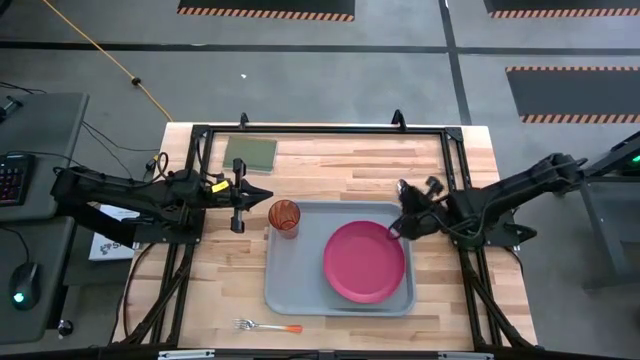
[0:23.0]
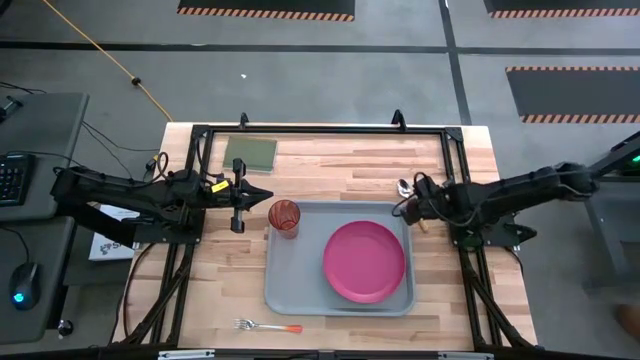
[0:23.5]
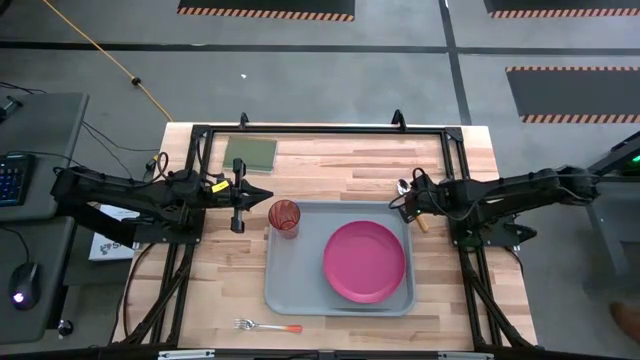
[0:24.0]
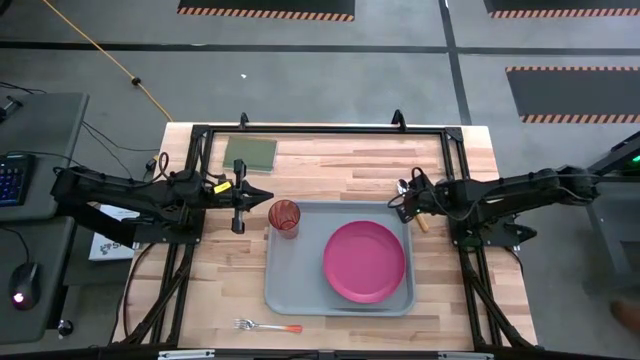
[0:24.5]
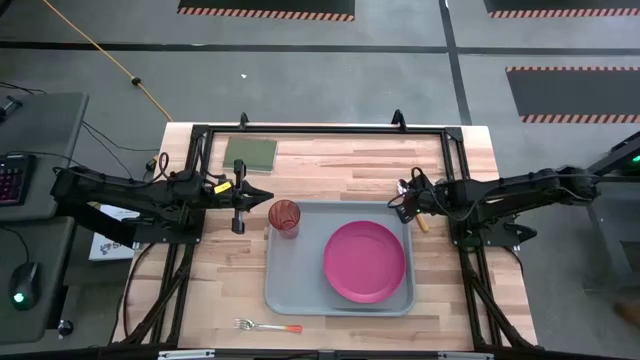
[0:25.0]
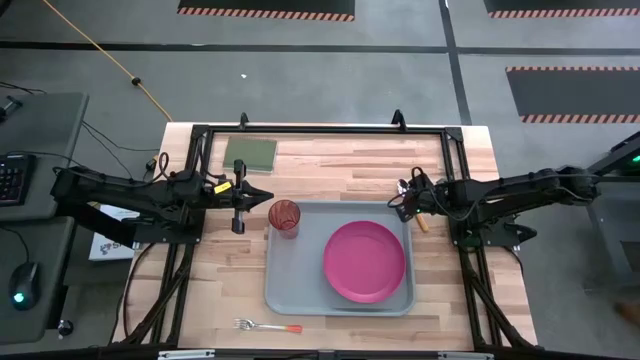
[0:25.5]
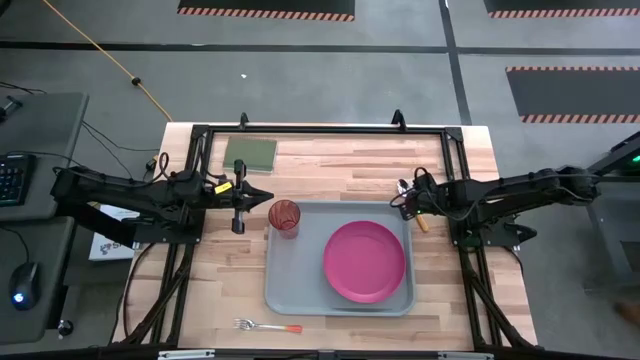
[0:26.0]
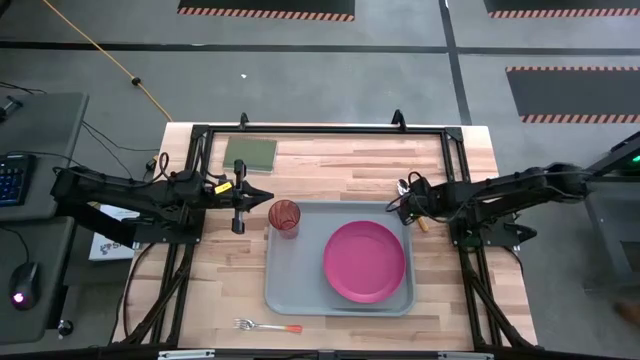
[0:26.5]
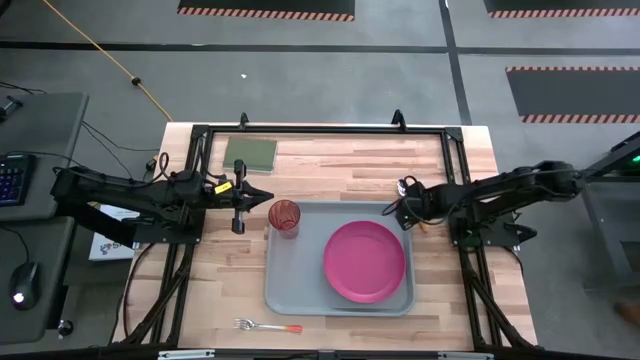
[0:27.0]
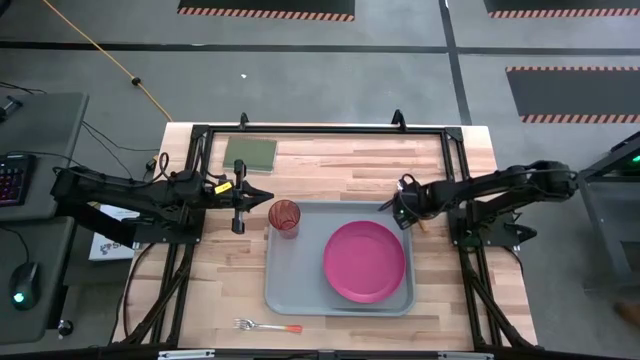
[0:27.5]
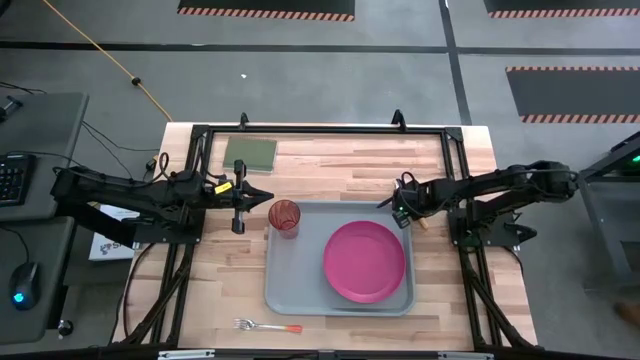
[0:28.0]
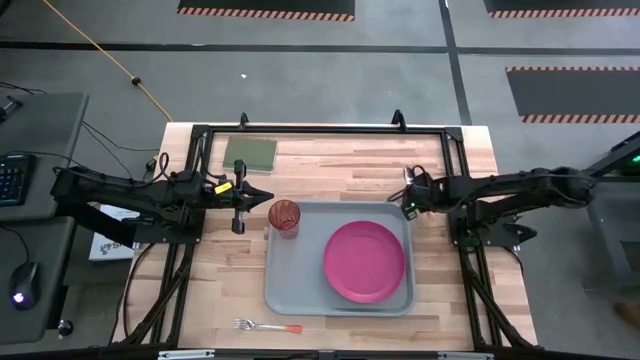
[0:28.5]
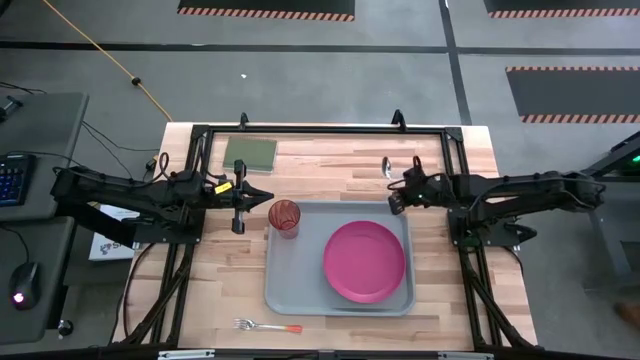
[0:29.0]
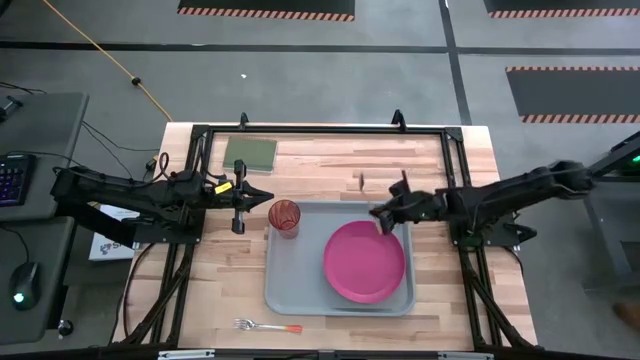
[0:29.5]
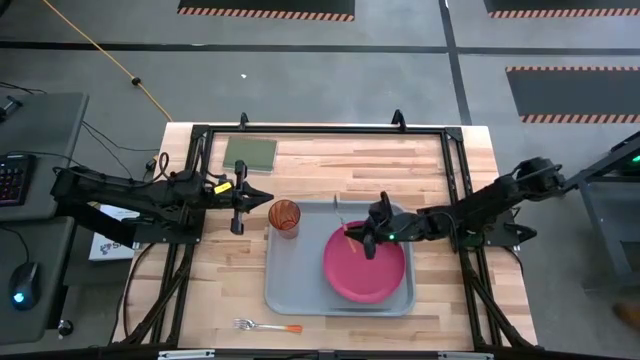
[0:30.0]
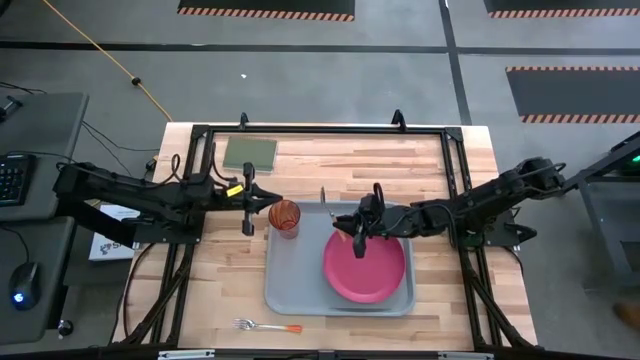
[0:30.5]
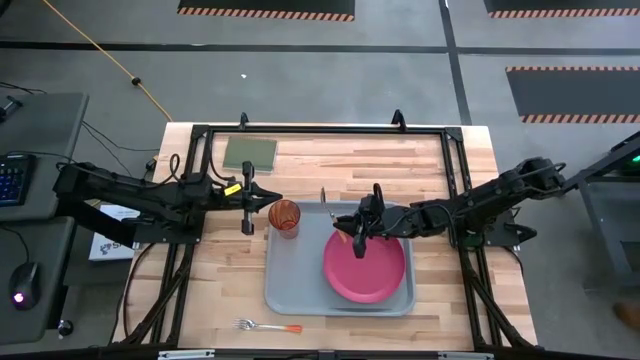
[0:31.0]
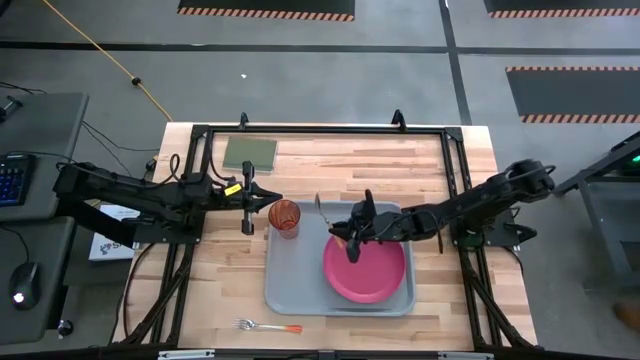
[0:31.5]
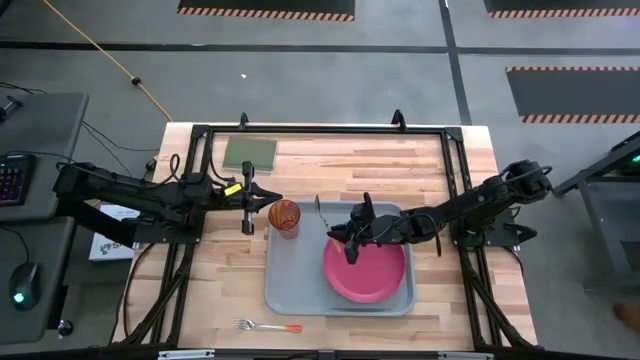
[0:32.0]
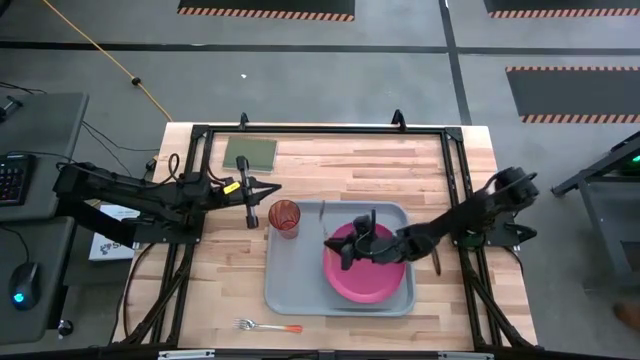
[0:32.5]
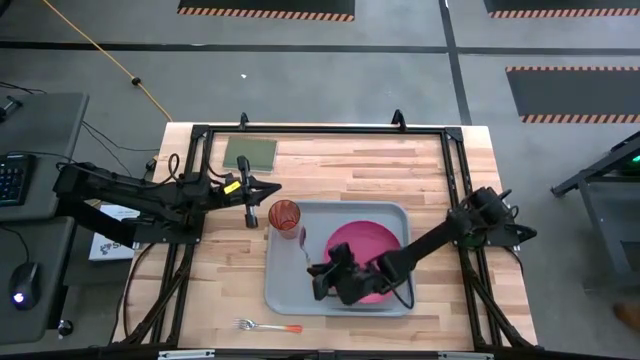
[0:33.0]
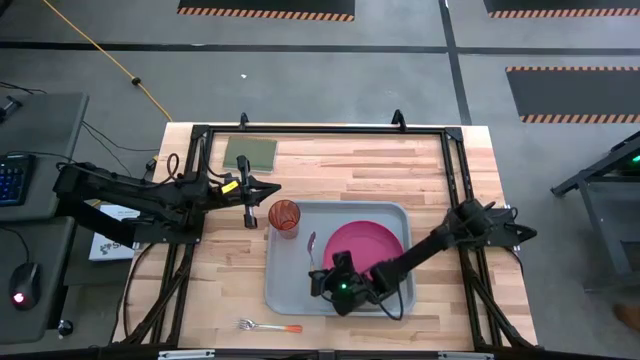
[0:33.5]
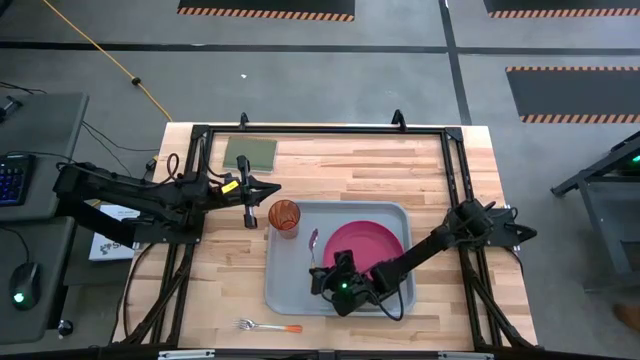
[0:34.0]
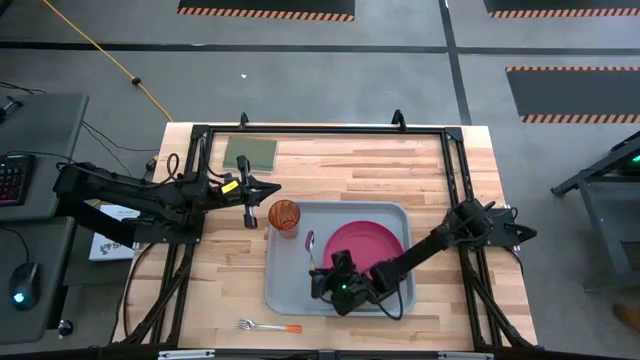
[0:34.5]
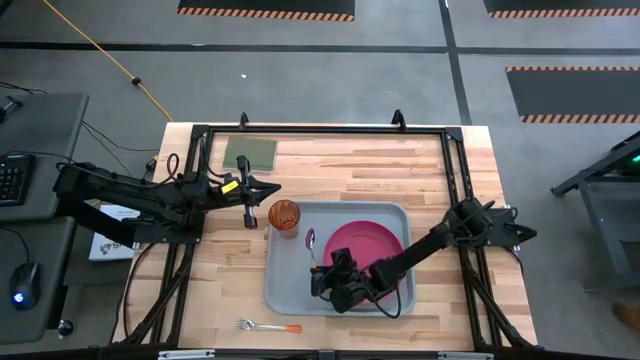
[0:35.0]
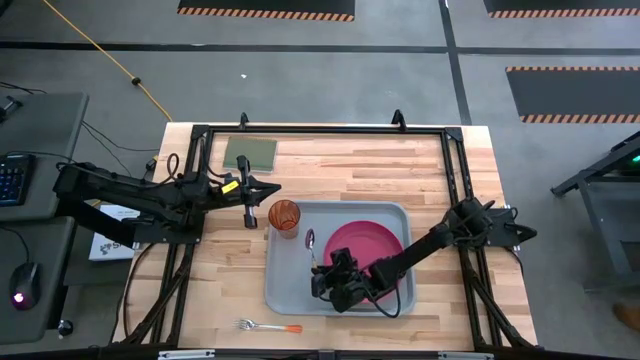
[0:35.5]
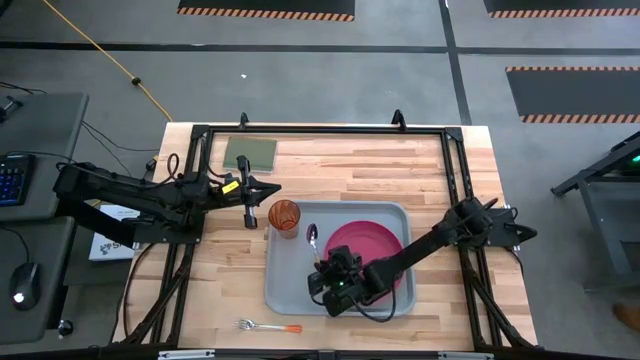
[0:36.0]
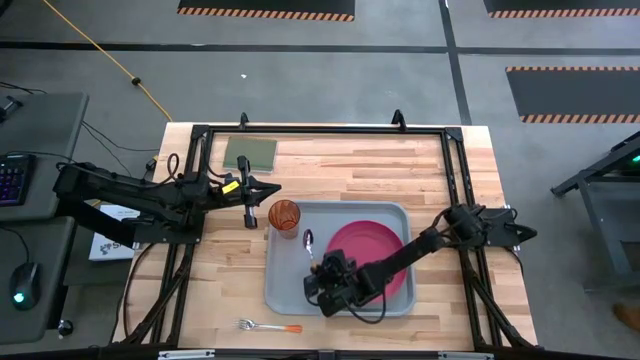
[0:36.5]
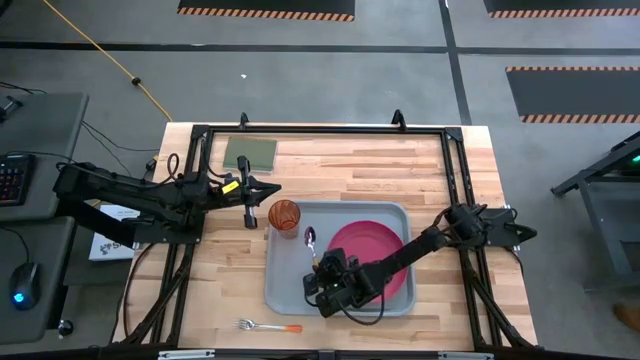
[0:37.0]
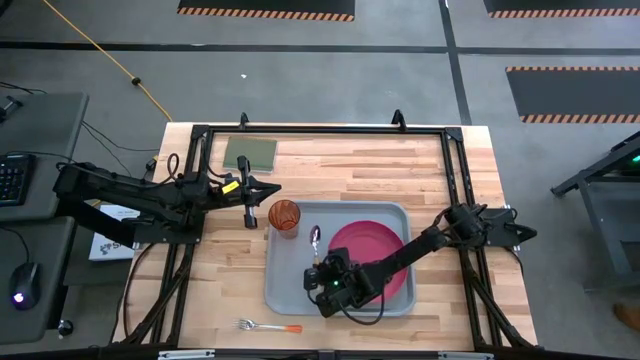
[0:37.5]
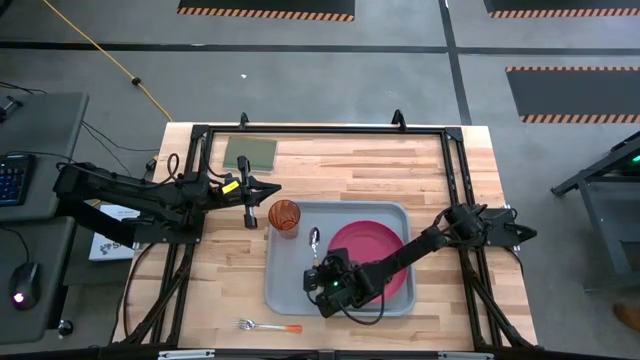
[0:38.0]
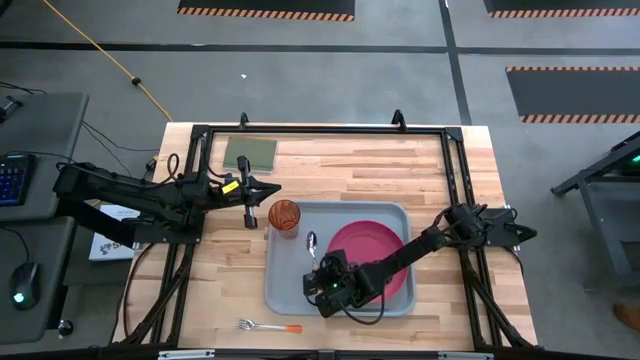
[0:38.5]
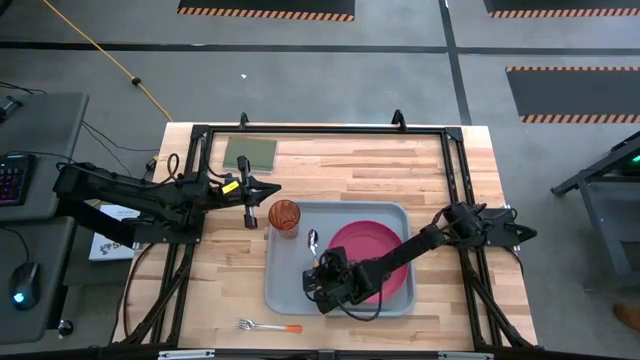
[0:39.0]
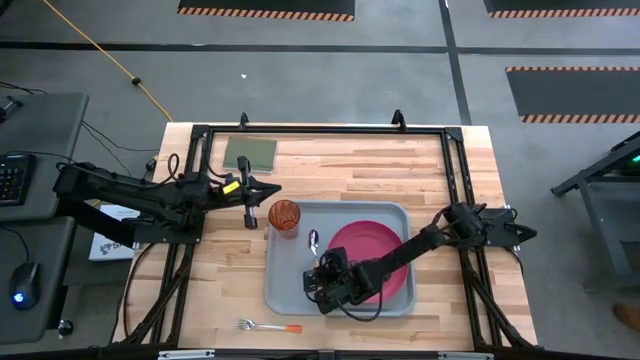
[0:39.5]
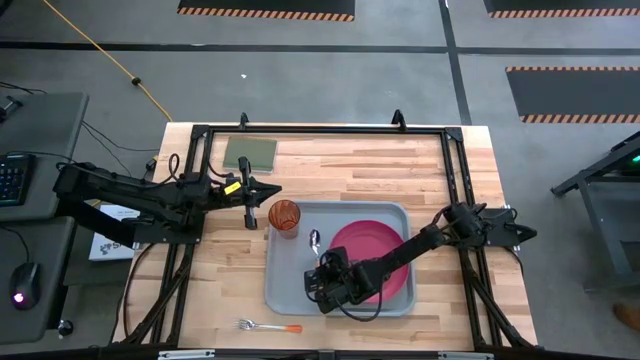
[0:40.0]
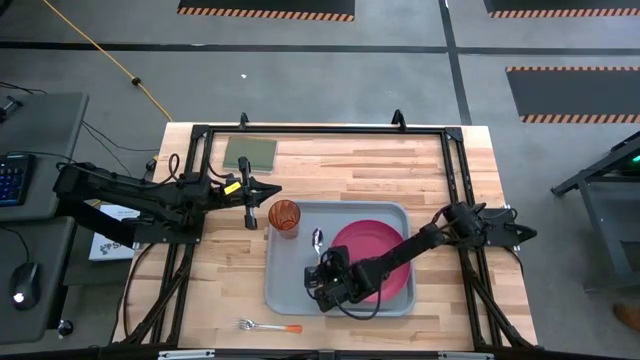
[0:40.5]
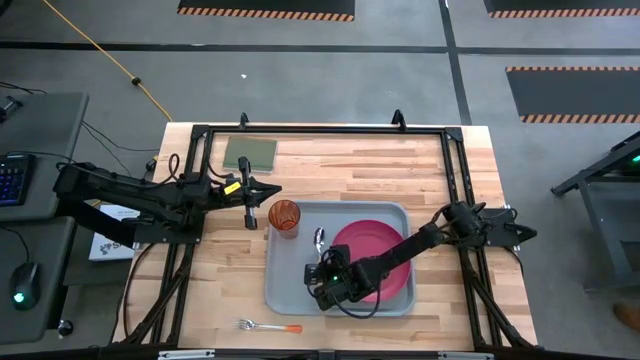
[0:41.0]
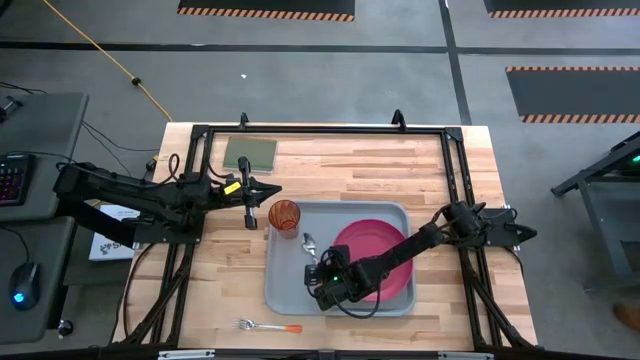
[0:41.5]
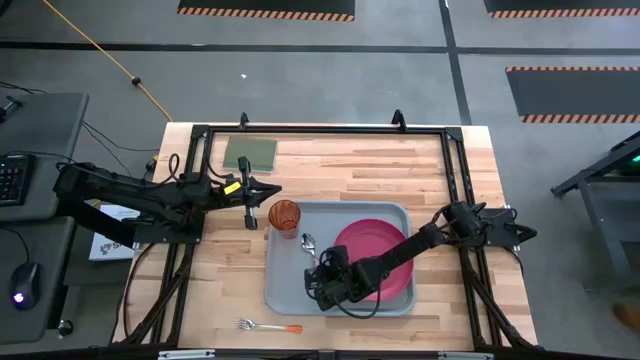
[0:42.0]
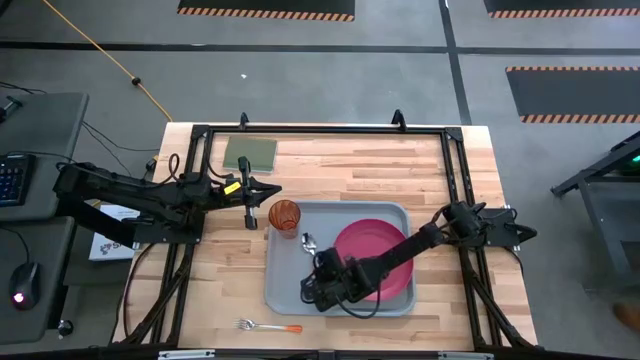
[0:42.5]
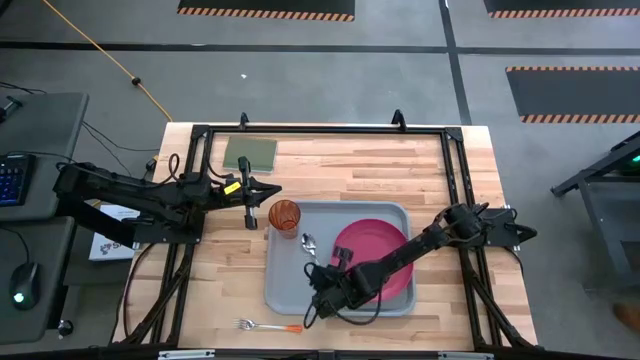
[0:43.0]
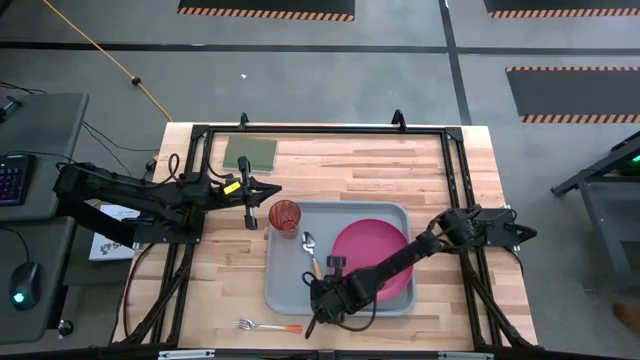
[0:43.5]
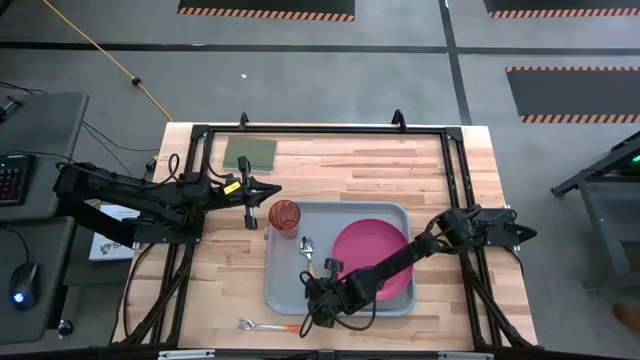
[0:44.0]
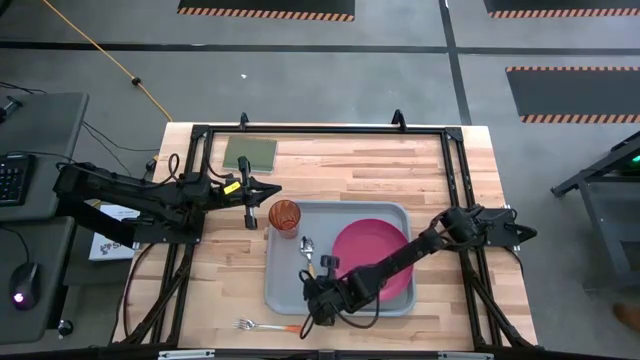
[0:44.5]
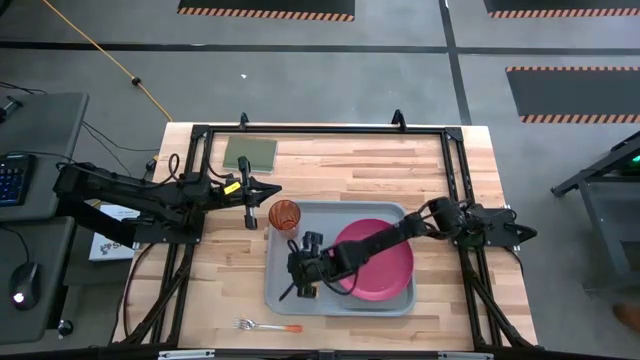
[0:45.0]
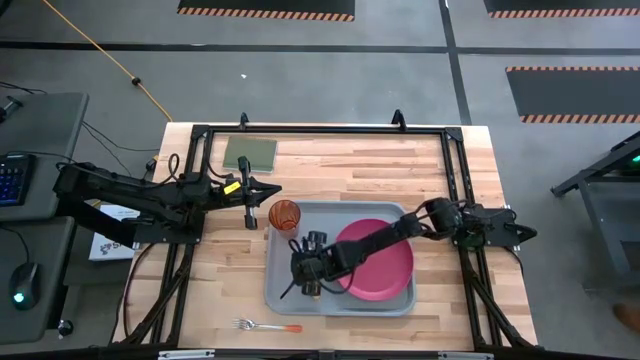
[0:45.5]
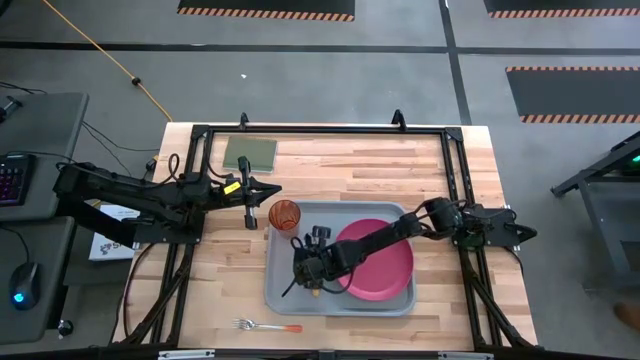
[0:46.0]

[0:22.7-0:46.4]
Task: Pick and place plate/cup/fork/spoon on tray
Put the orange spoon to the left side of the pink plate on the gray tray
